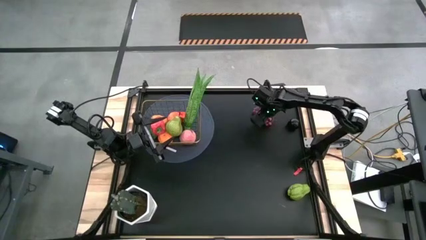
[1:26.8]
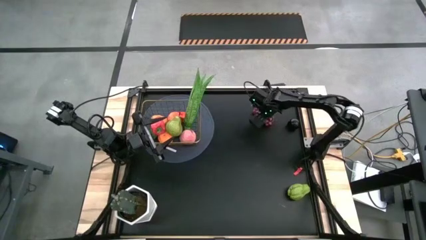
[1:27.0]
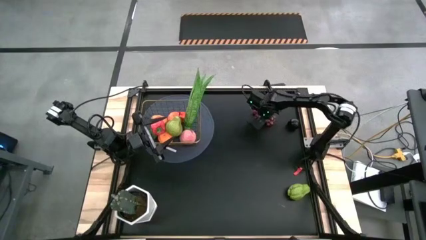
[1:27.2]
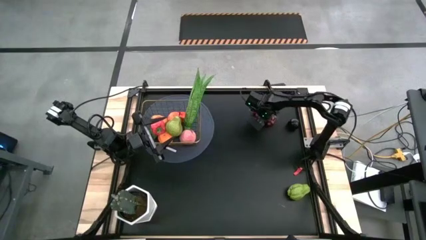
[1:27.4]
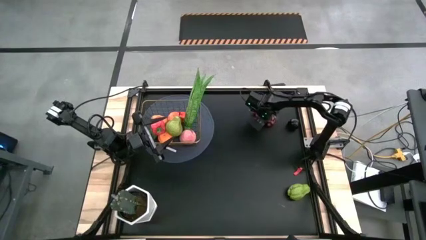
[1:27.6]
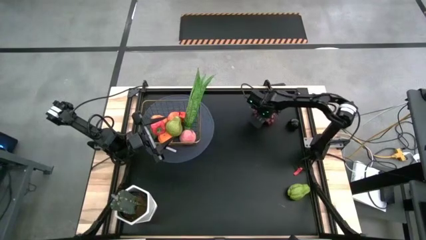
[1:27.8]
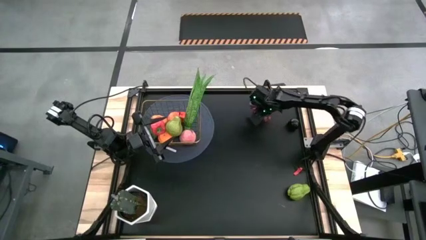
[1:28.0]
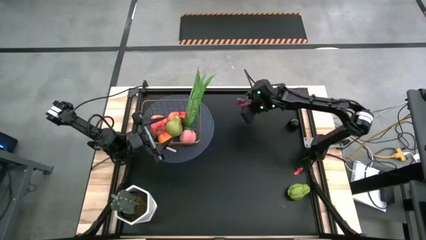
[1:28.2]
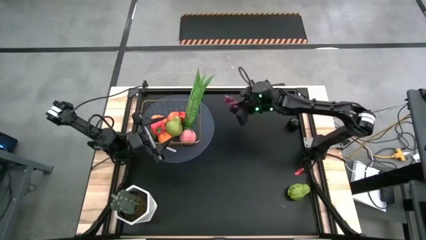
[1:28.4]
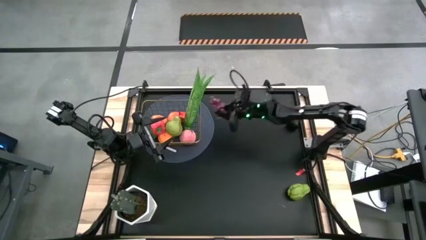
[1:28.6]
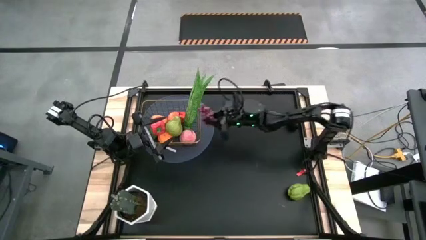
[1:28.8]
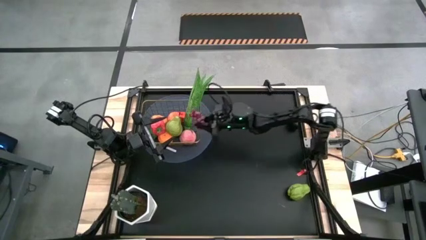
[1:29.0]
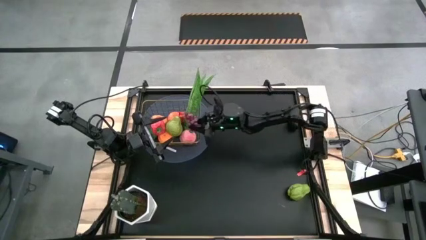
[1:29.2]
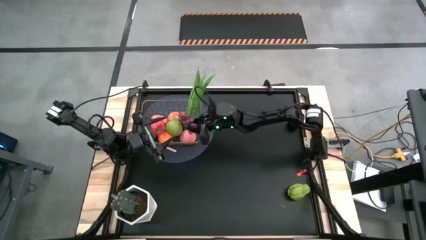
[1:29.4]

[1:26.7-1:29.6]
Task: Build produce basket
Put the red grapes into the wire basket

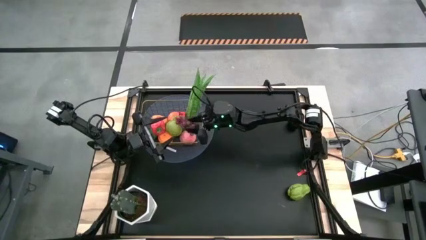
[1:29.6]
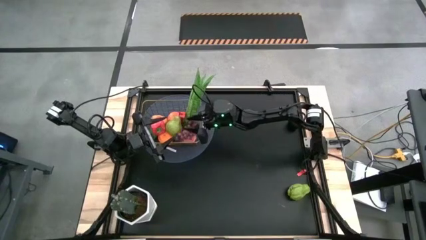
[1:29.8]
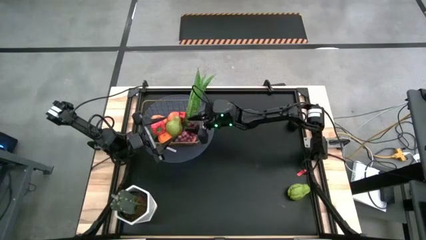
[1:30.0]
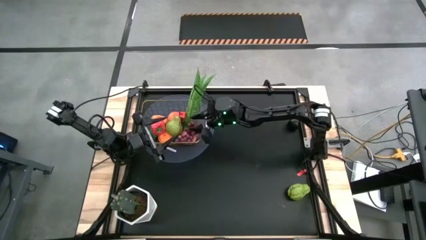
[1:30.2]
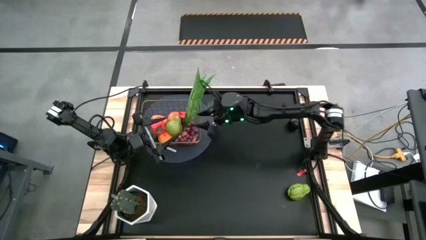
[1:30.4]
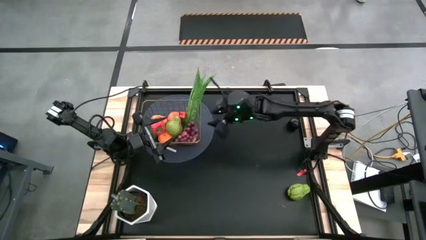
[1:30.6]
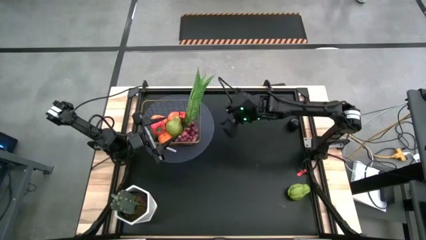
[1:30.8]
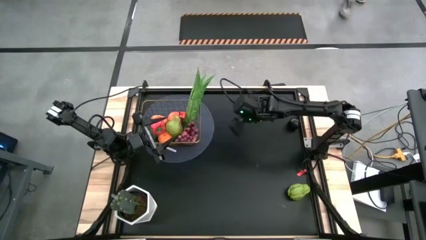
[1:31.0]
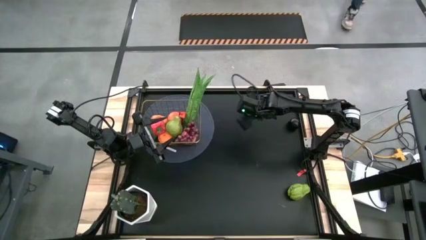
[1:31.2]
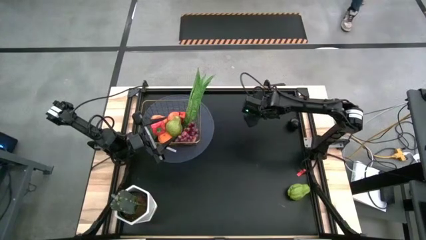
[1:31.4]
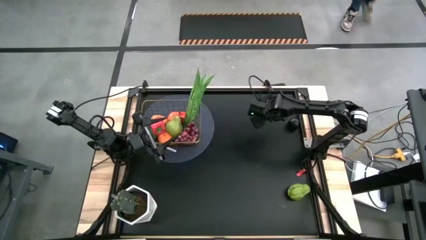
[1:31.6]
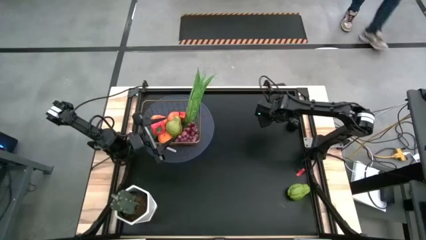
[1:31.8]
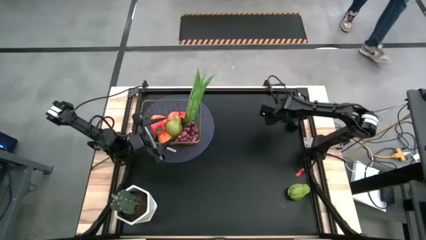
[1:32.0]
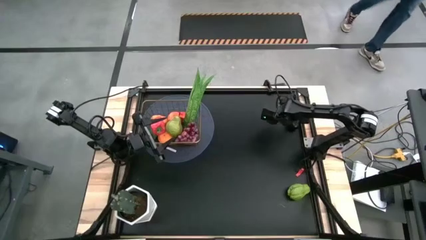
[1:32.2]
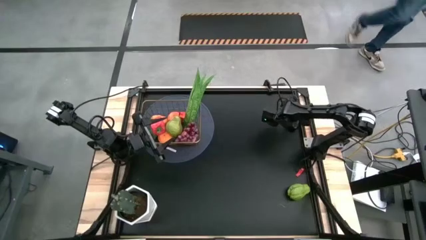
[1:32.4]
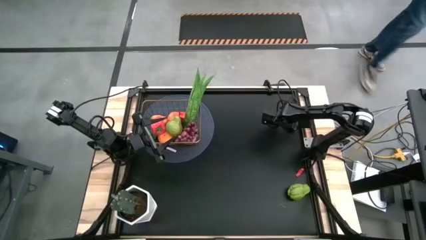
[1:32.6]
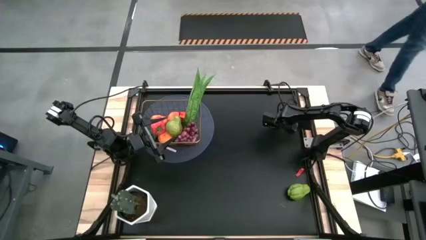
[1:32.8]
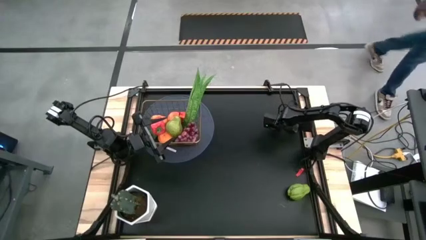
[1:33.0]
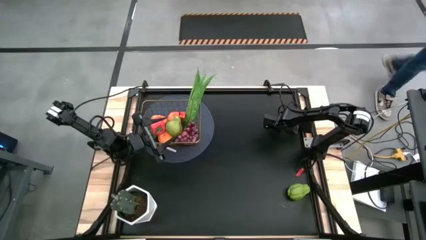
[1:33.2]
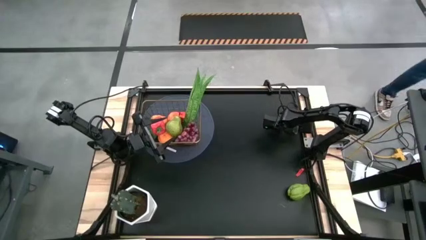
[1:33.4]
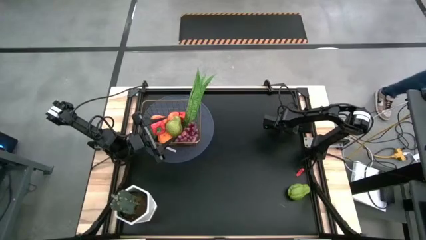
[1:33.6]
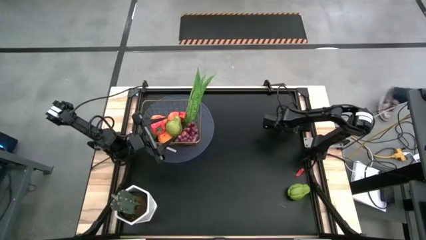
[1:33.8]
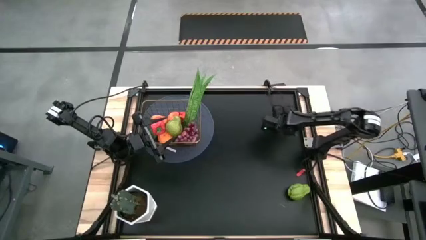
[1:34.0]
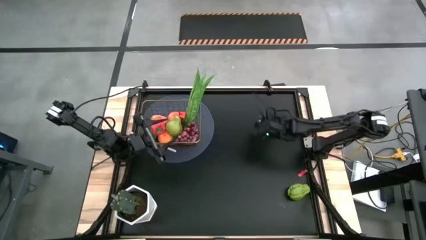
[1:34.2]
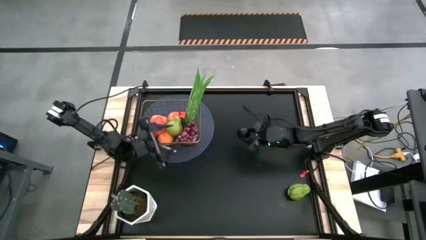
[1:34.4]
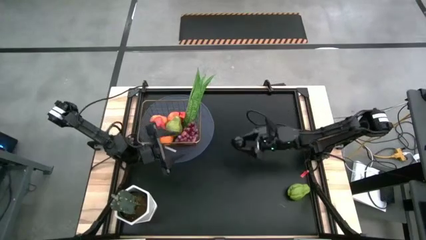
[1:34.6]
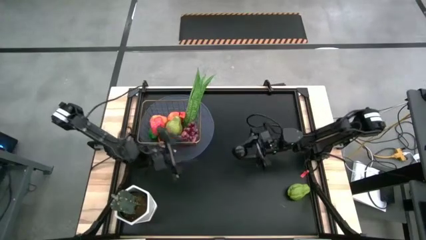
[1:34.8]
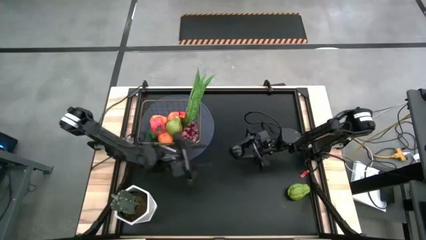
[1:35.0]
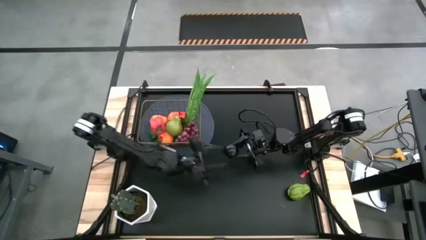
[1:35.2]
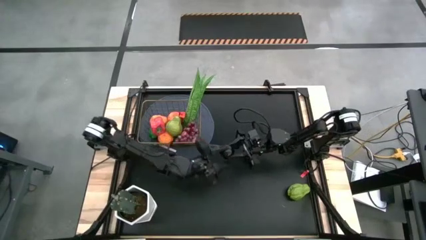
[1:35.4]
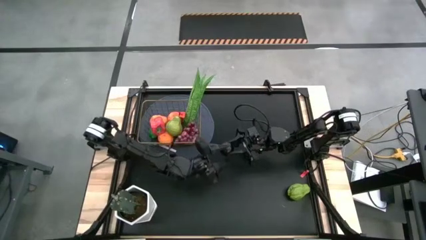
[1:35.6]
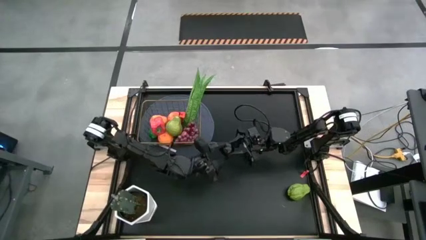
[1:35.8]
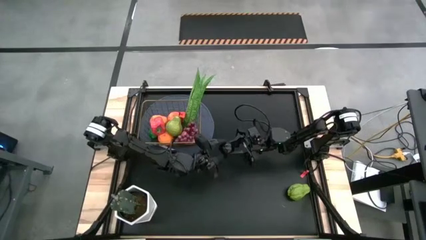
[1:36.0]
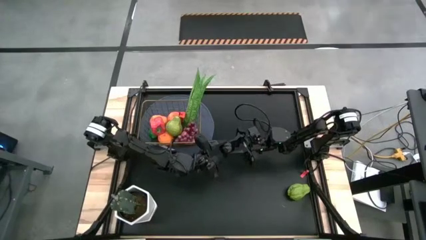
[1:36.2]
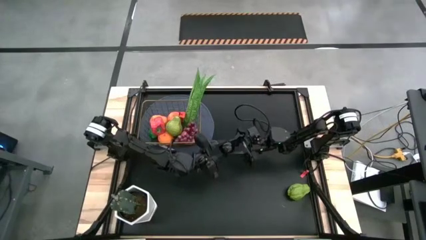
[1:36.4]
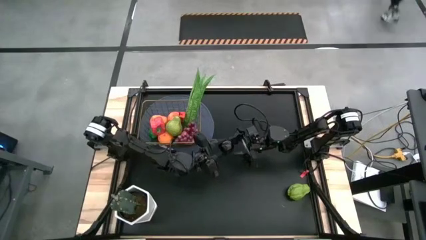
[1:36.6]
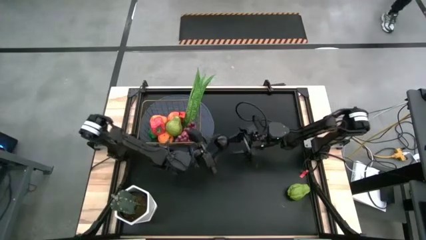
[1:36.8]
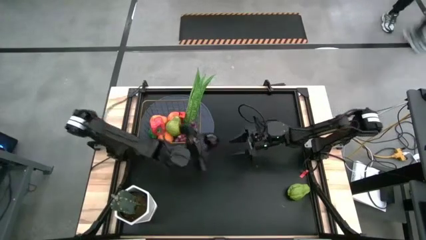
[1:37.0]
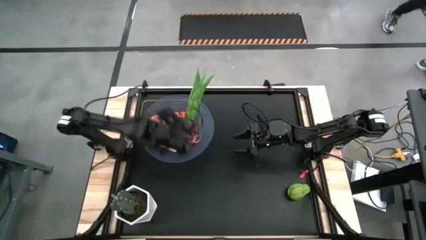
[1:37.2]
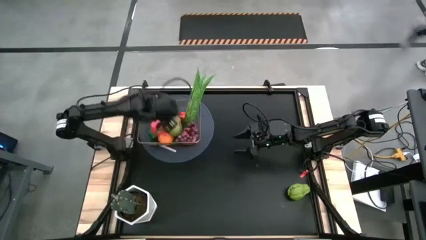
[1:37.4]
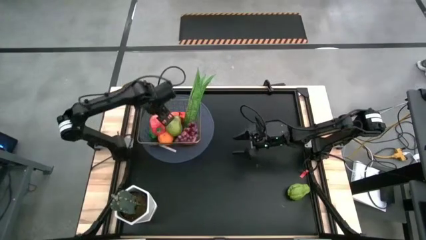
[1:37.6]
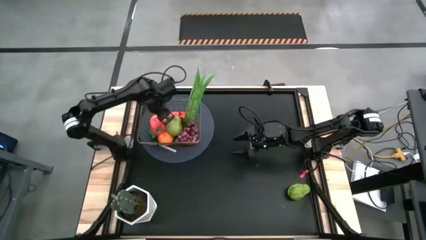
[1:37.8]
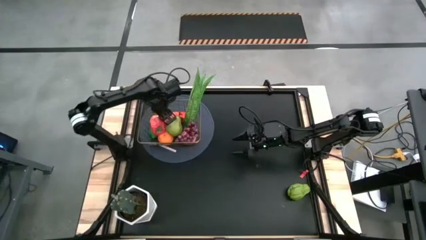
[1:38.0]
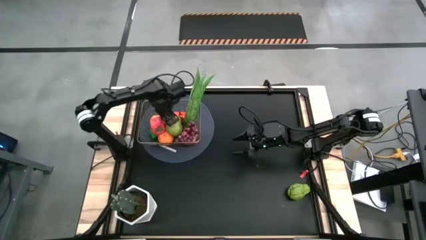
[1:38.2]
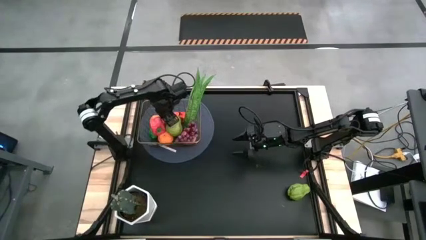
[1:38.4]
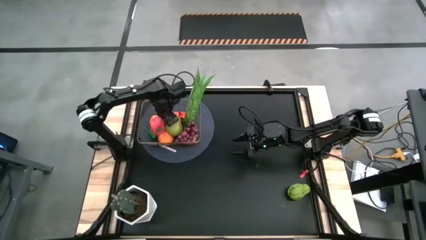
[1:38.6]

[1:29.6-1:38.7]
Put the black plum into the wire basket

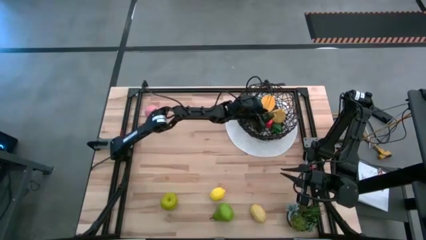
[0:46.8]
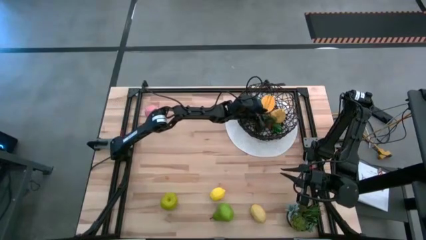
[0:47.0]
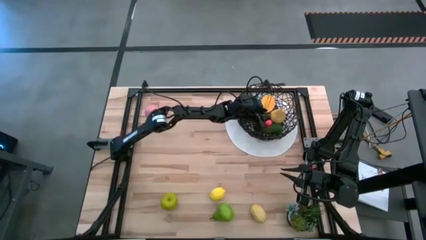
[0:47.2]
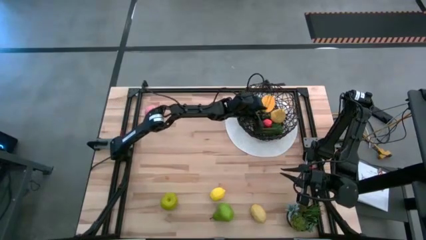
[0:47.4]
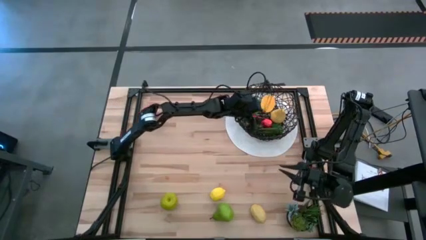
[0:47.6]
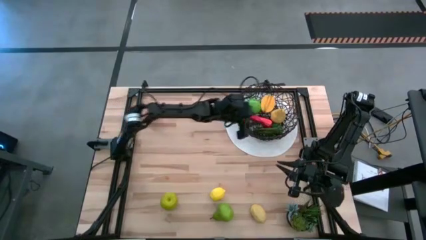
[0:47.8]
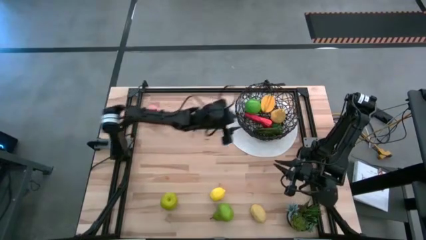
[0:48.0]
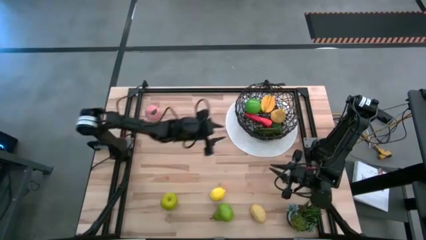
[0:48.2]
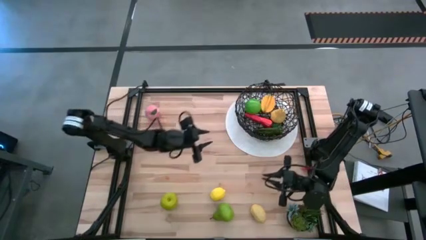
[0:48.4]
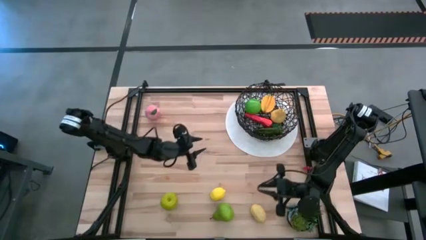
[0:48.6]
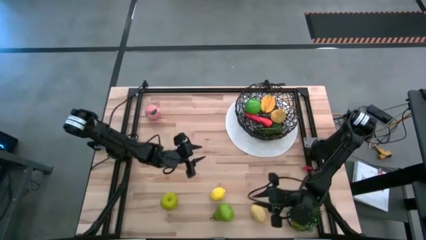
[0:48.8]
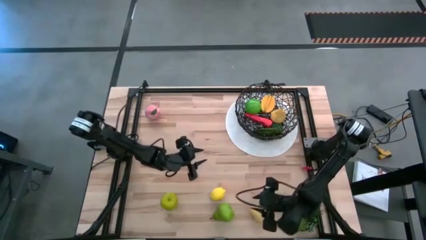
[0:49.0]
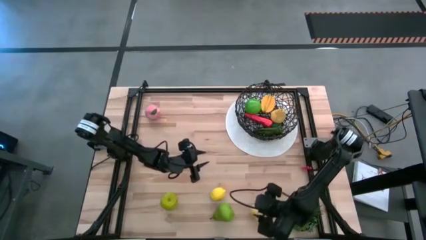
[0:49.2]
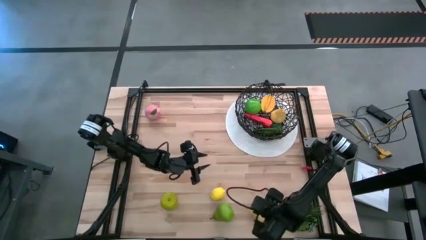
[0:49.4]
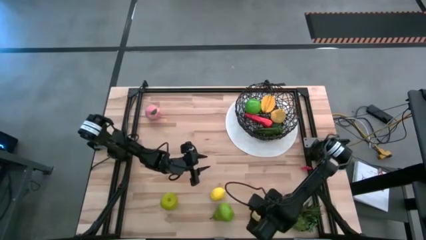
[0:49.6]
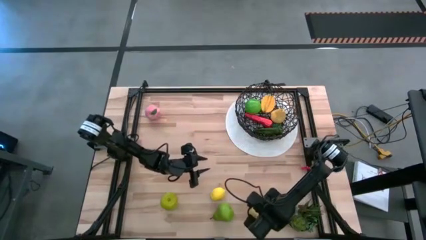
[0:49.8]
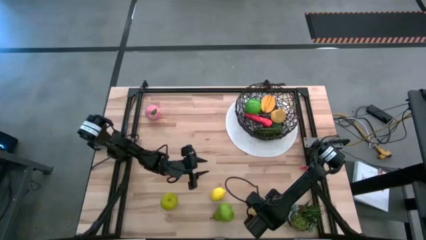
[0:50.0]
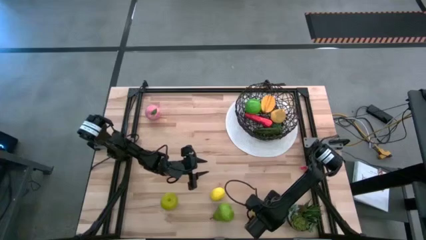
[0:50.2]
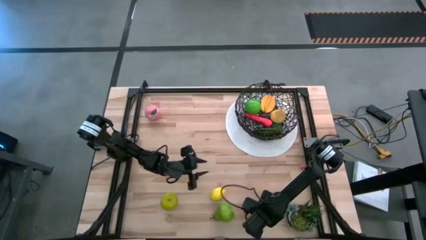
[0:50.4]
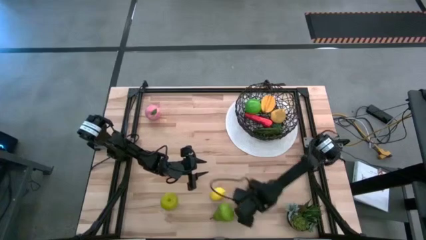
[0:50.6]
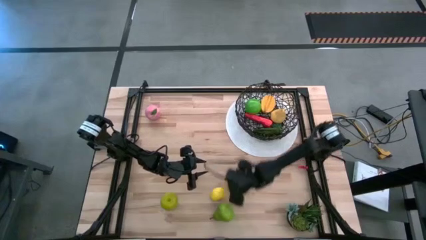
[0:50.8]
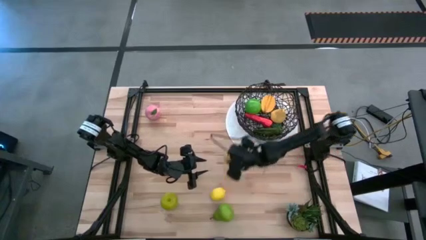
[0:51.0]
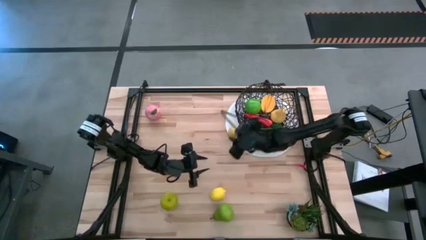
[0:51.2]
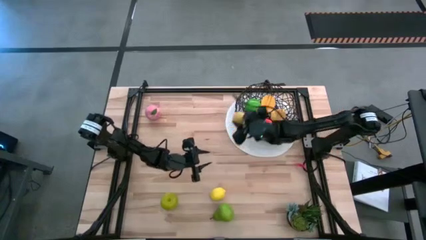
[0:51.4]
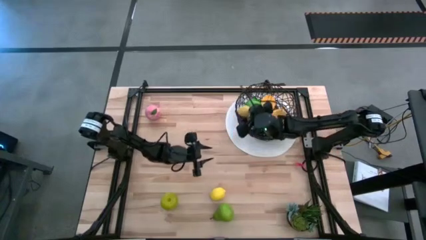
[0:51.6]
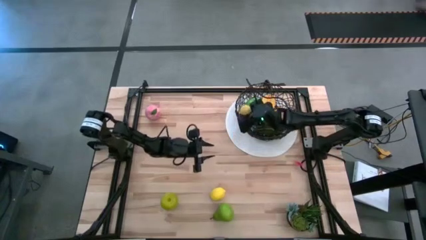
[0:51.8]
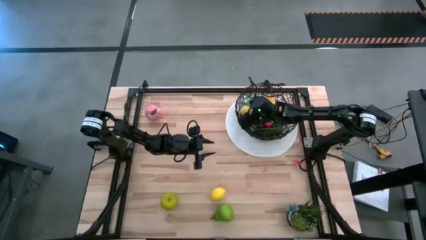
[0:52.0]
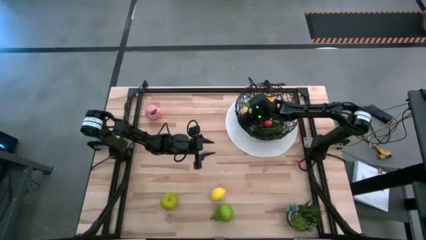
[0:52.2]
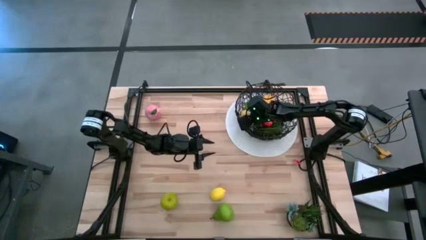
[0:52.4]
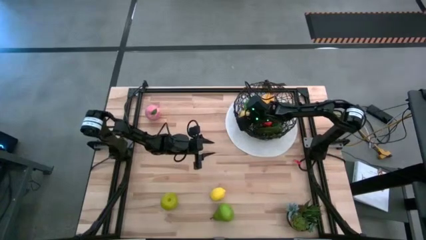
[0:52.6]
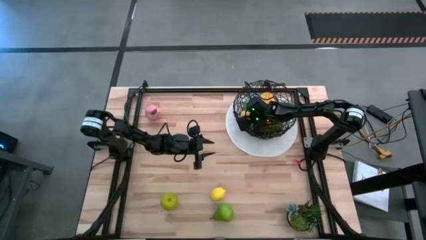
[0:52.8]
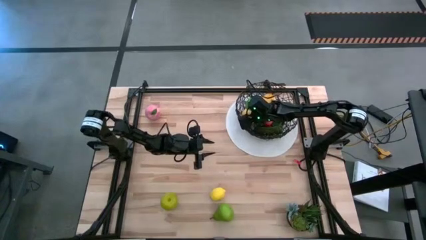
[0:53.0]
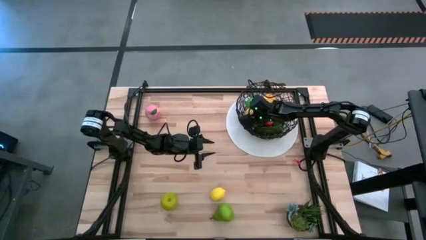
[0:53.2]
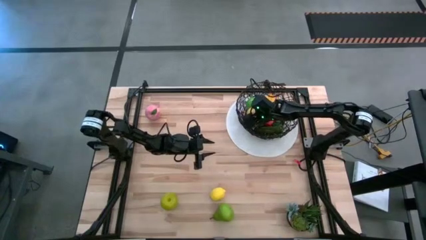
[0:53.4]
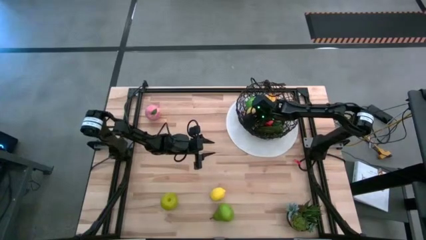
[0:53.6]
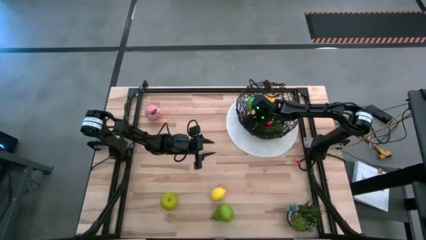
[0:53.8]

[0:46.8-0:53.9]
Task: Build produce basket
Put the bottom yellow lemon into the black wire basket
